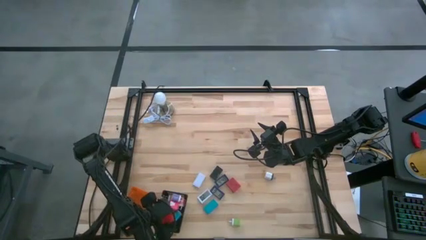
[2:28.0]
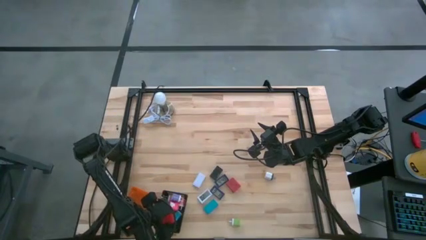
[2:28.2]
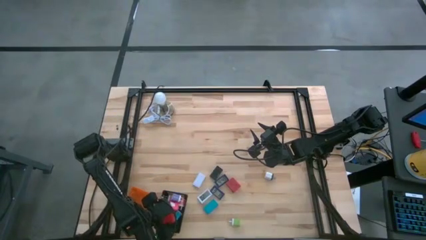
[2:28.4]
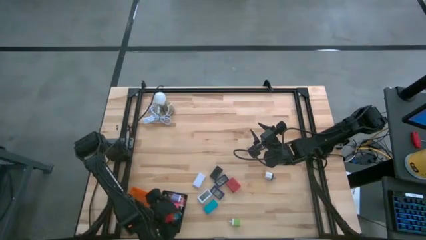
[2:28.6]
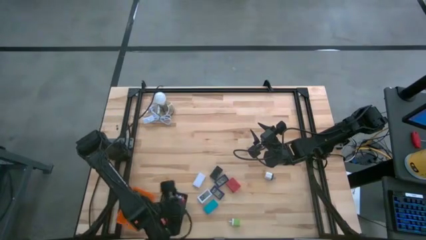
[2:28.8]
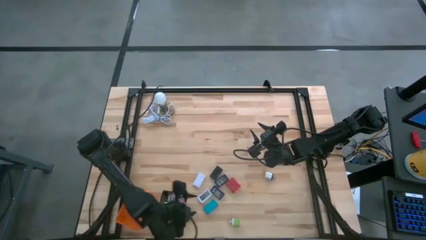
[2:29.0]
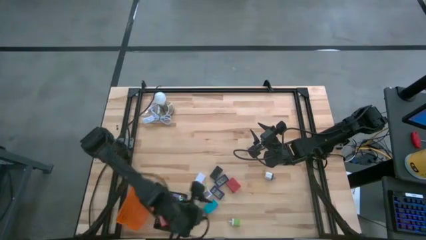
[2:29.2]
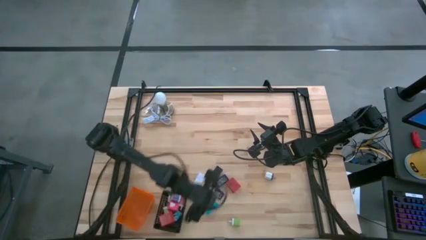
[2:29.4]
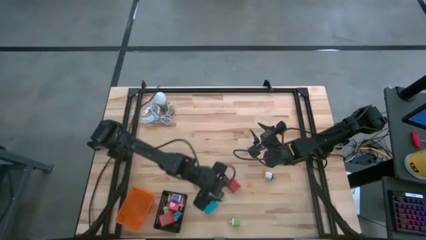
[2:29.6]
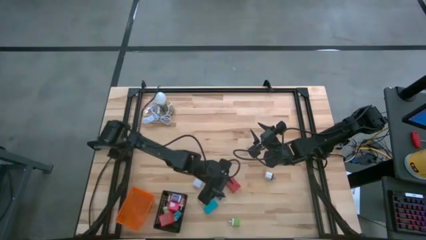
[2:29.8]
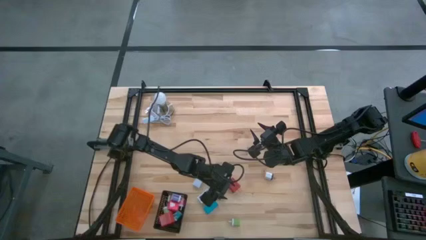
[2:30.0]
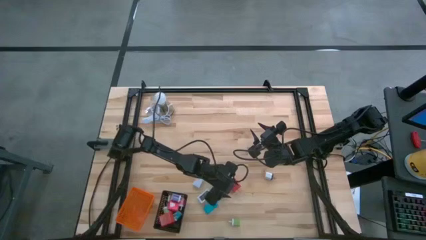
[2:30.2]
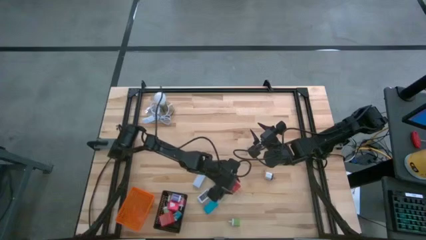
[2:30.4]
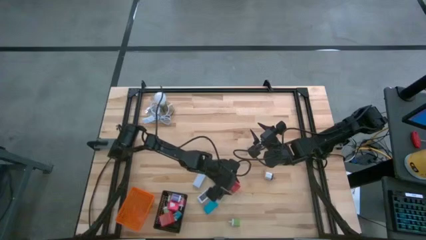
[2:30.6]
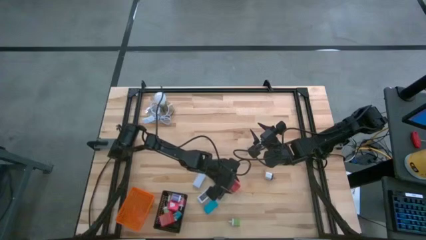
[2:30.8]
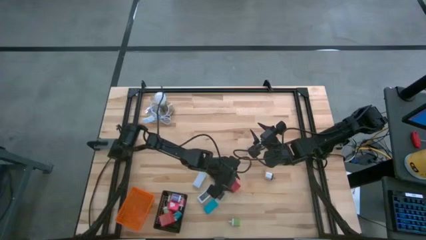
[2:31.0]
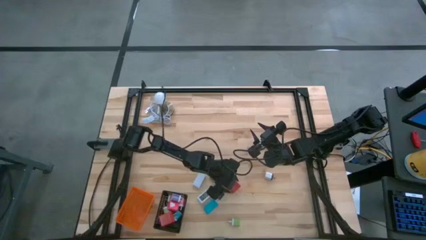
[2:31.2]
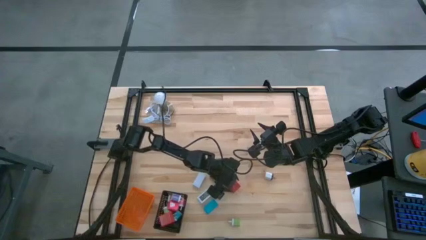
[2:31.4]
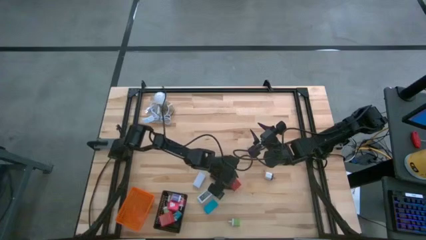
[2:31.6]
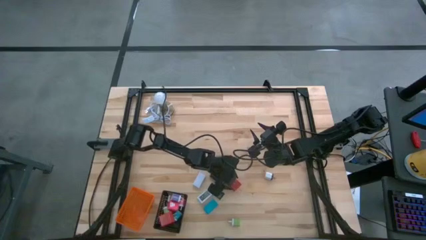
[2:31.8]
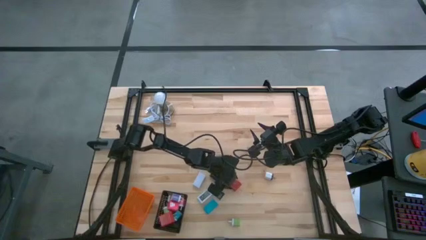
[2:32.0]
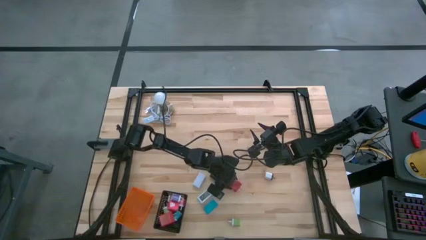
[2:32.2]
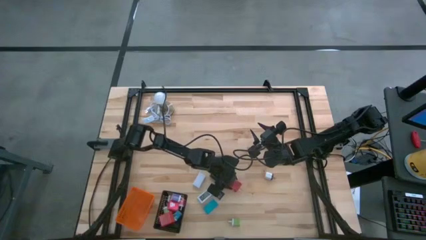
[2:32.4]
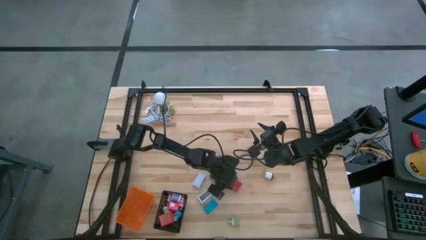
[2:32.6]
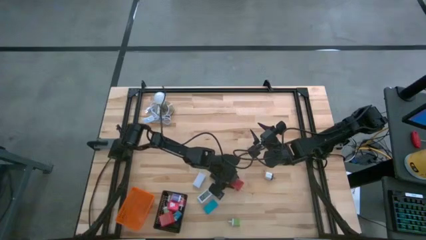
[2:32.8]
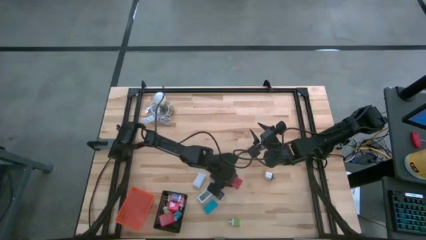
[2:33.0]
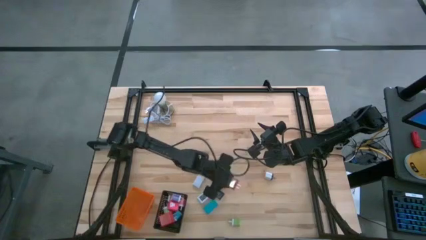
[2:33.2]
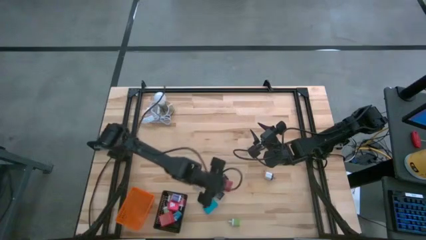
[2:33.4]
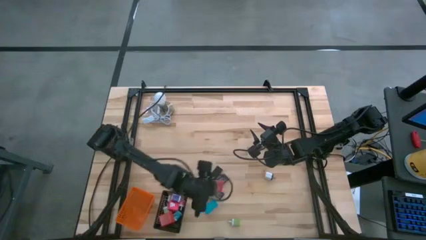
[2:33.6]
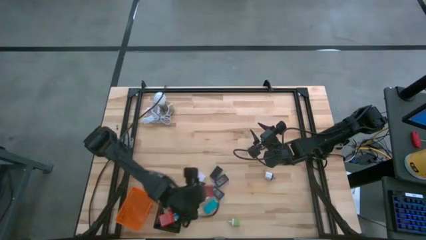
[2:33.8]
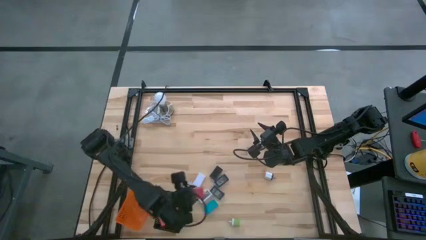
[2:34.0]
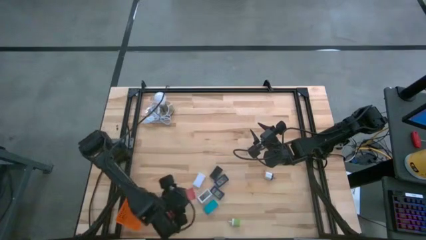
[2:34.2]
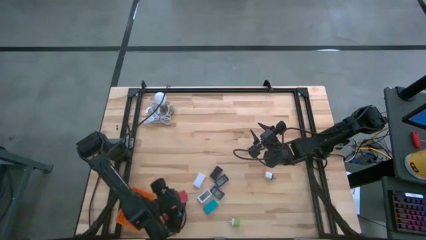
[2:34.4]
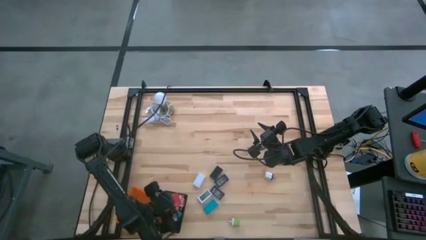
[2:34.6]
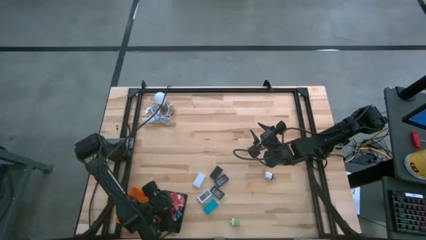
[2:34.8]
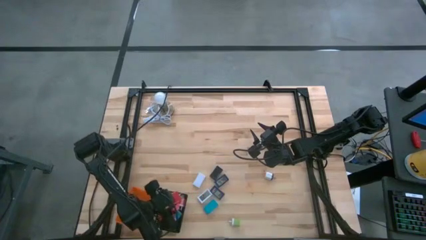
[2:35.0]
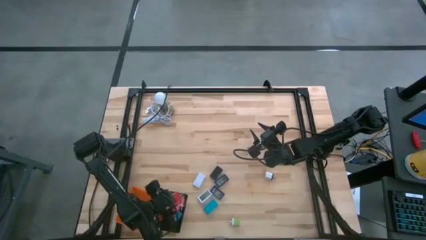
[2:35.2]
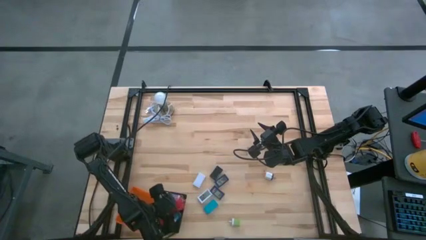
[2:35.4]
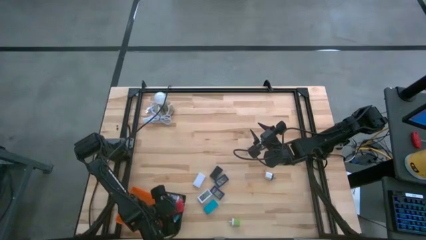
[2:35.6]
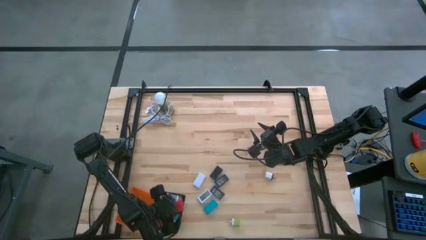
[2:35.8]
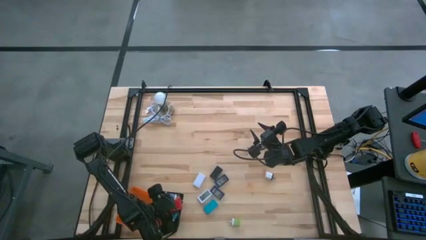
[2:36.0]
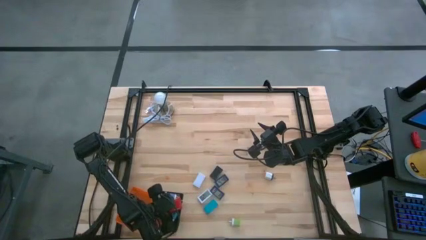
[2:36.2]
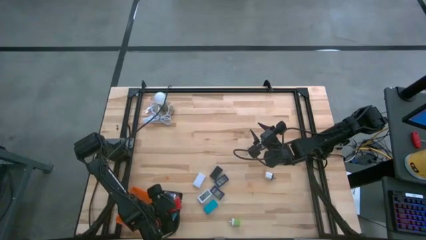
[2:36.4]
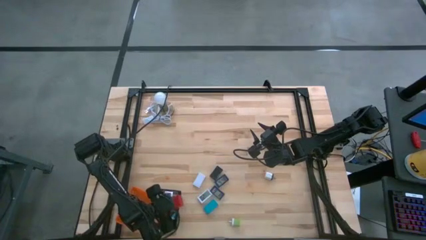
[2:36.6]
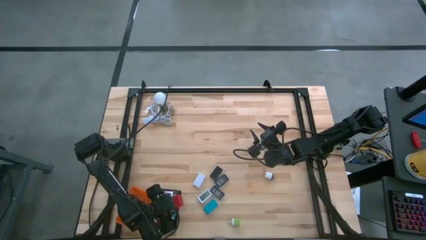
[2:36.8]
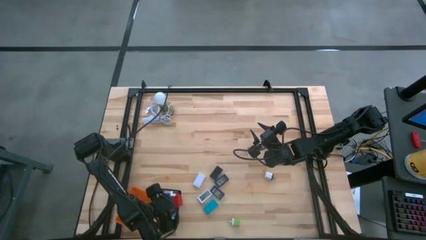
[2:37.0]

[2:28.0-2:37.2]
Task: Pick & Place Office items
Put the red charger adapter into the black basket

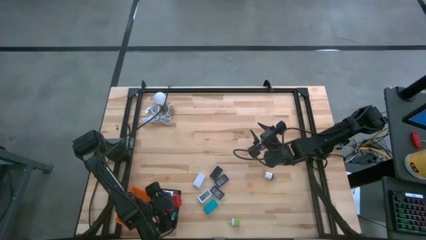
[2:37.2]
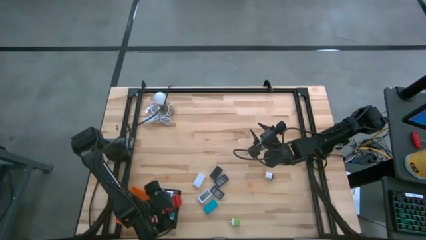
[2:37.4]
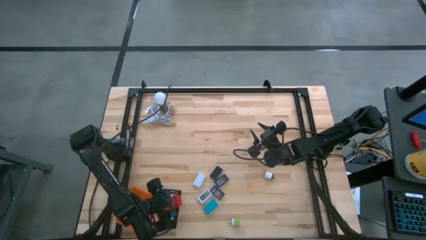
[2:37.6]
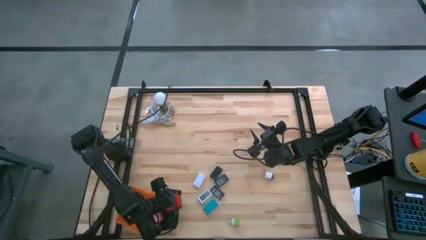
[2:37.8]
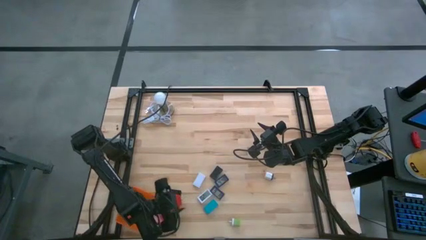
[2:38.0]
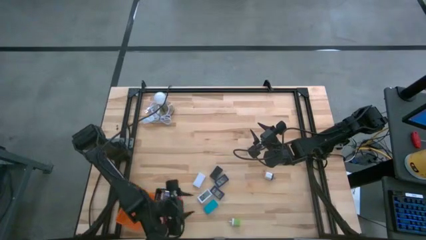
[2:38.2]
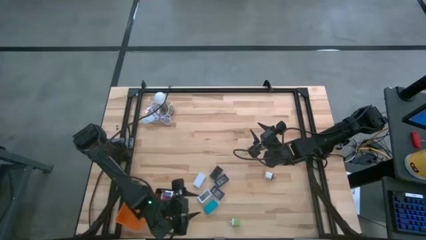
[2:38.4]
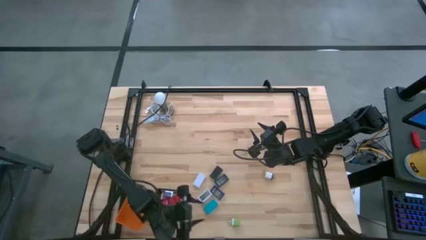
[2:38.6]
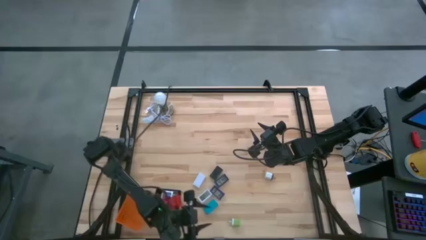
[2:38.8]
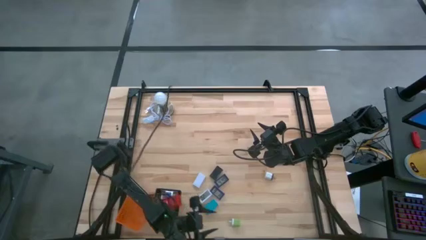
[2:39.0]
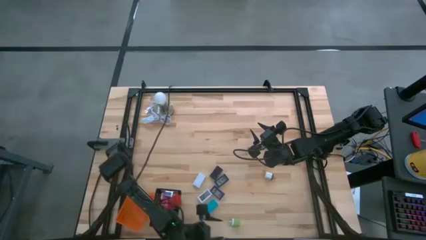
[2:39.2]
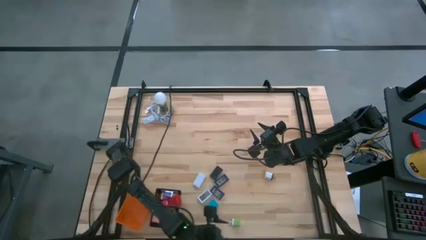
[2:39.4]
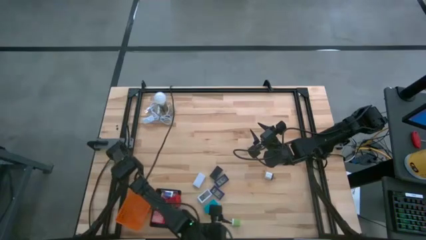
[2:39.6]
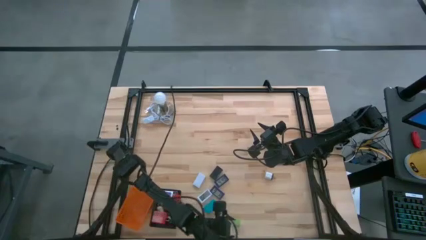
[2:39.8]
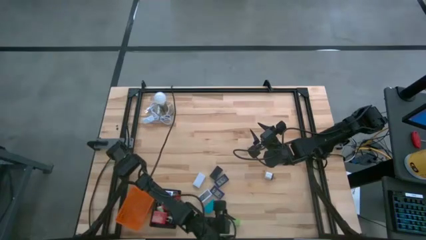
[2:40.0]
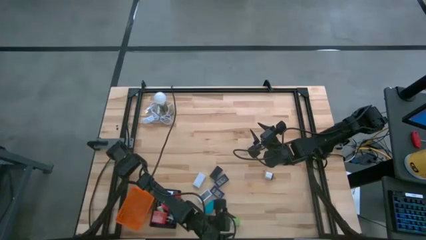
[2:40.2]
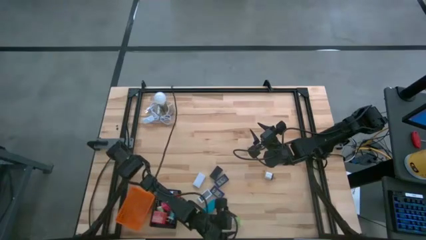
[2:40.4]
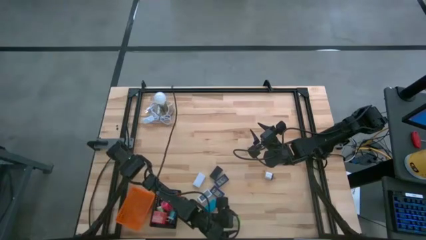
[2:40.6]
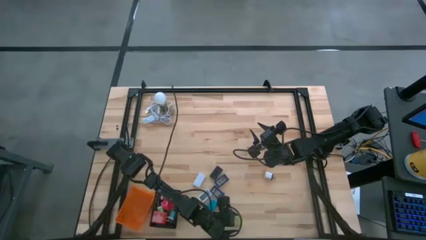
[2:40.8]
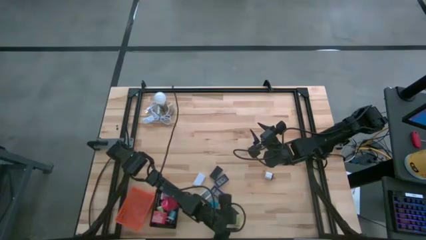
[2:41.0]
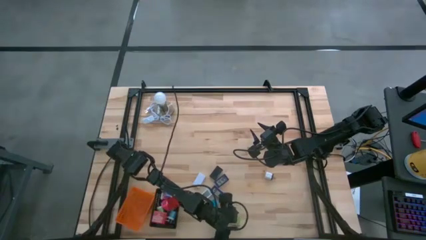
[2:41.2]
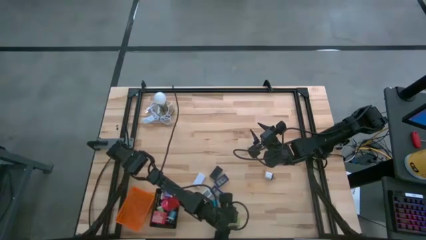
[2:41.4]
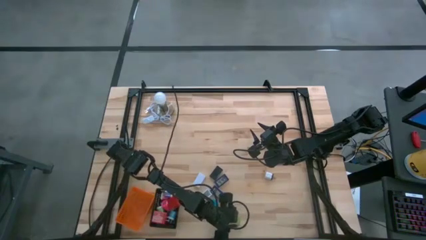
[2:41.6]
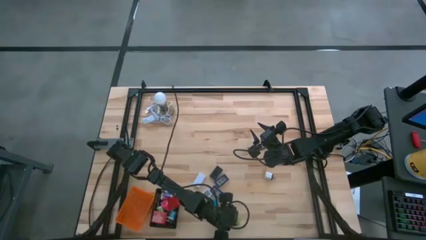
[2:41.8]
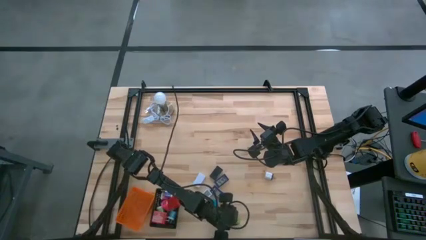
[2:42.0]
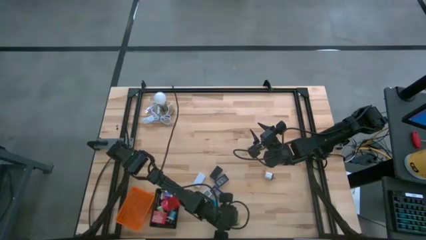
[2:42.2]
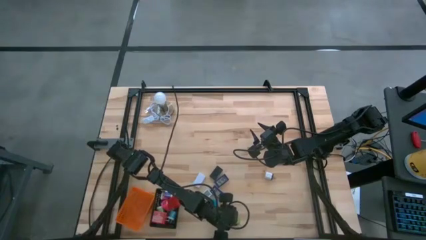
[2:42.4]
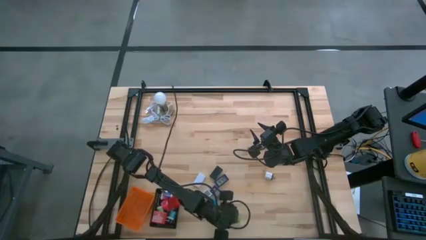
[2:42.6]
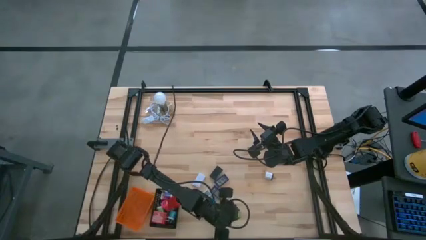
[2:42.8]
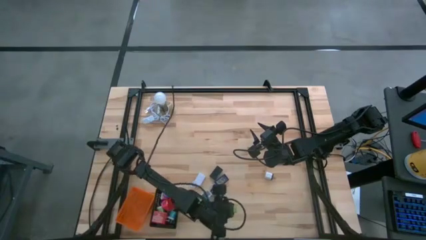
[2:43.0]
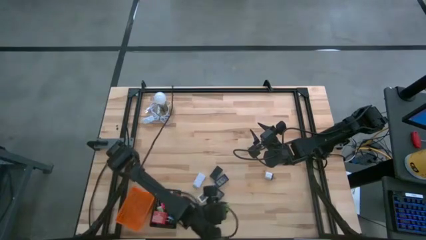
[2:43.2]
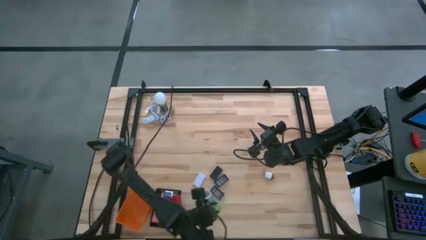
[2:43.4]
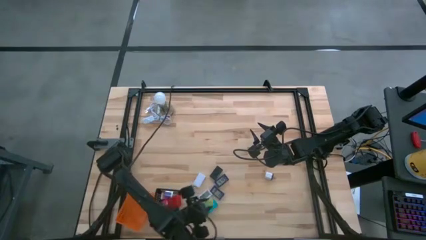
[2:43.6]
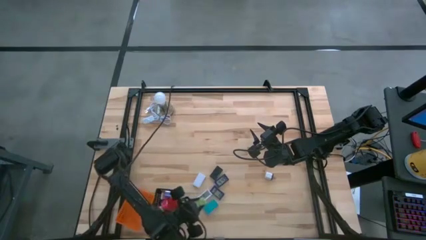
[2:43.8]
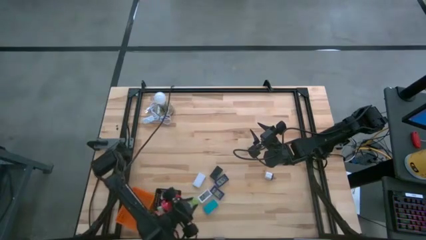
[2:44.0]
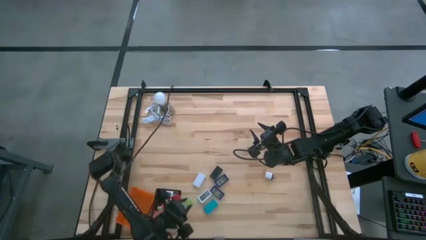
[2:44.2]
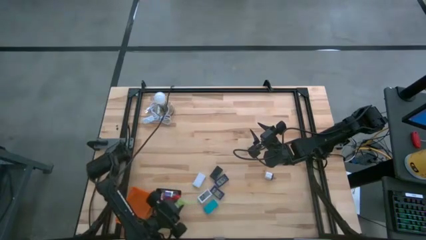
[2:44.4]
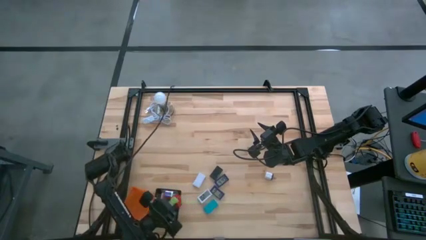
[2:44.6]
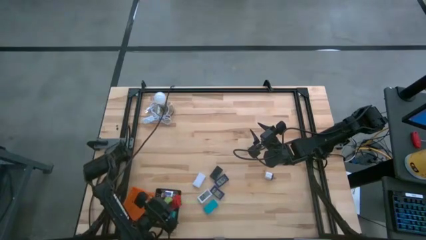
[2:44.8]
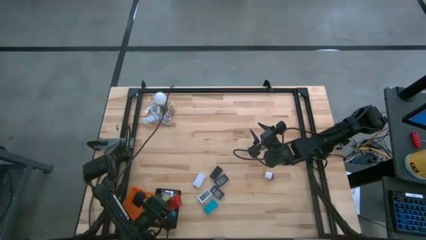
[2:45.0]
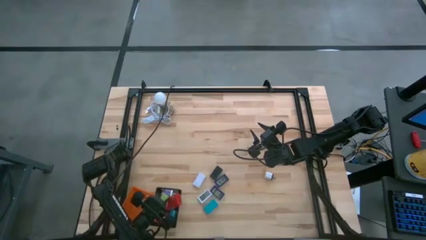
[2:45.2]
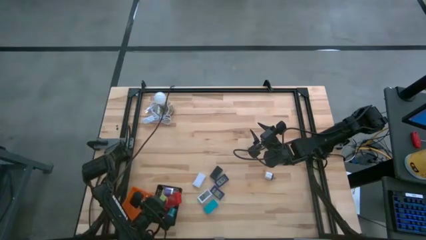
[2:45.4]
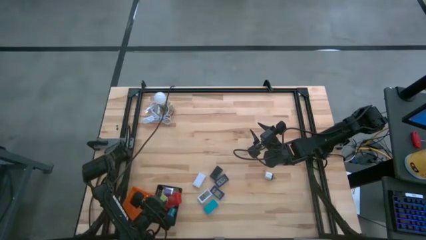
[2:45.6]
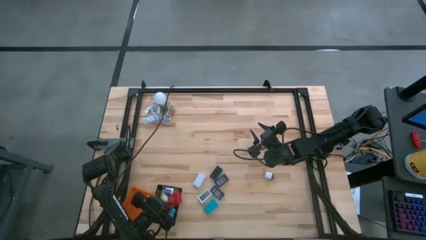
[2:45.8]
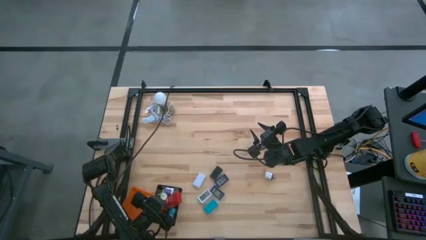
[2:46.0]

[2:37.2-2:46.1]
Put the green charger adapter into the black basket
